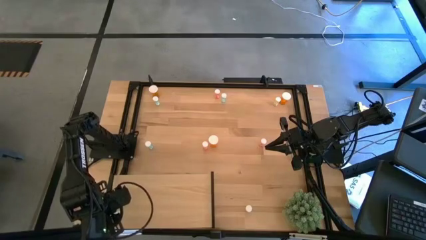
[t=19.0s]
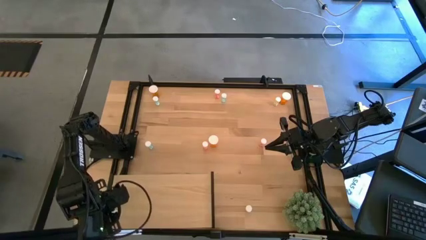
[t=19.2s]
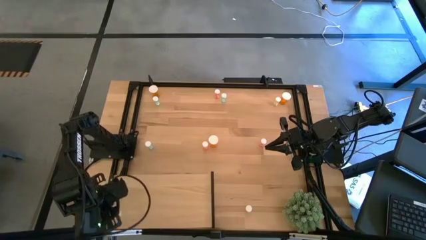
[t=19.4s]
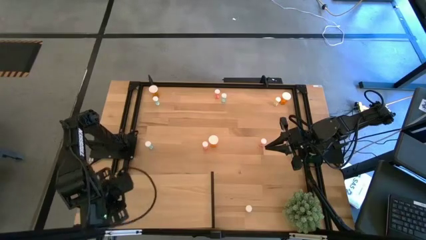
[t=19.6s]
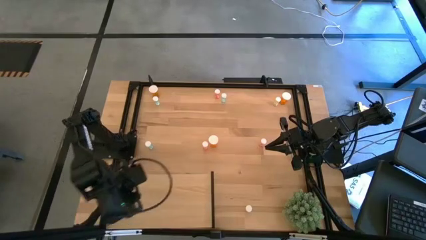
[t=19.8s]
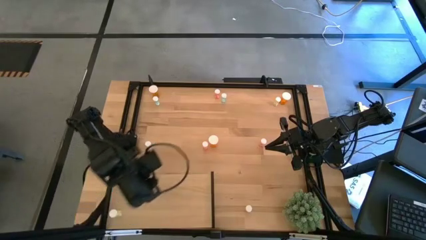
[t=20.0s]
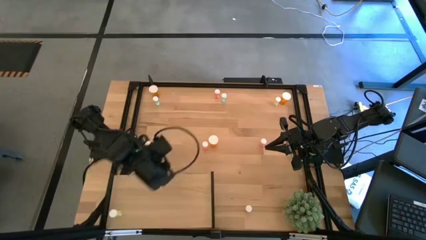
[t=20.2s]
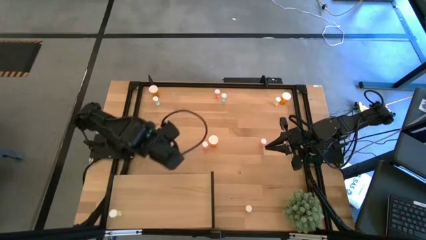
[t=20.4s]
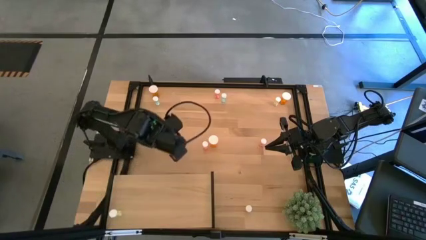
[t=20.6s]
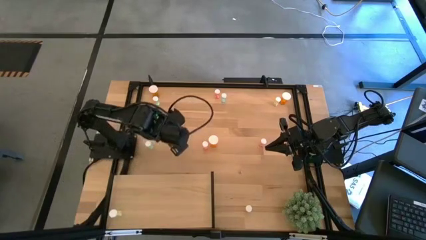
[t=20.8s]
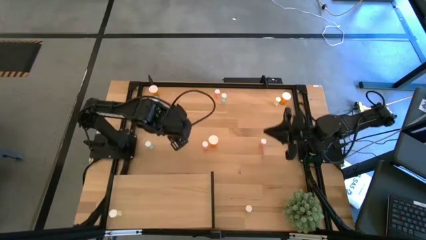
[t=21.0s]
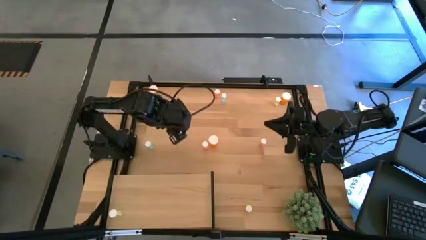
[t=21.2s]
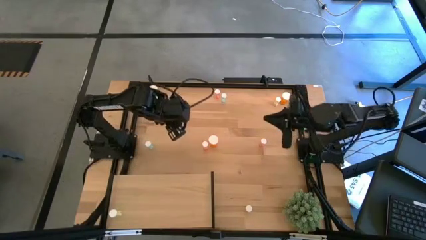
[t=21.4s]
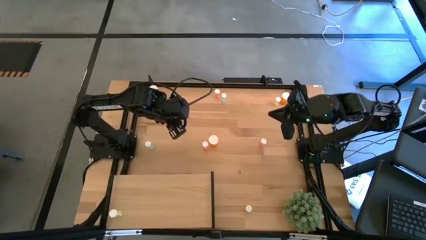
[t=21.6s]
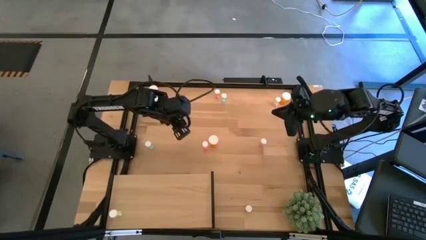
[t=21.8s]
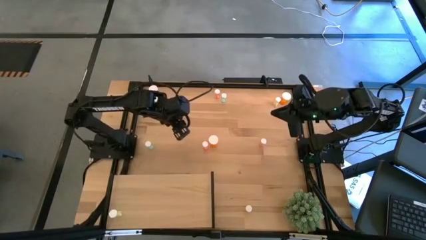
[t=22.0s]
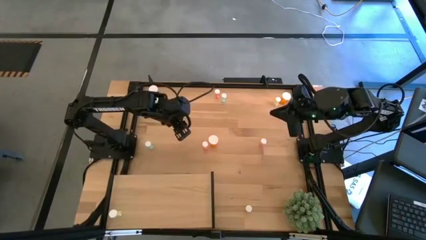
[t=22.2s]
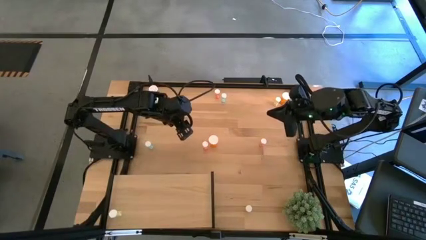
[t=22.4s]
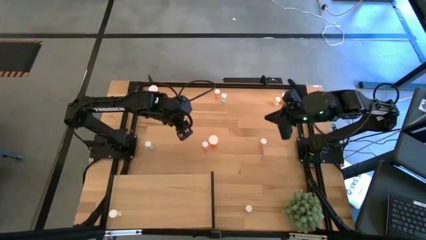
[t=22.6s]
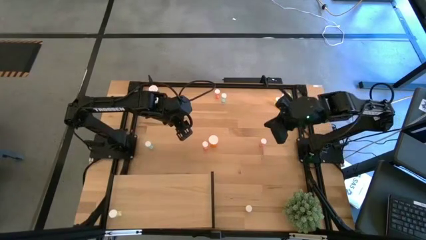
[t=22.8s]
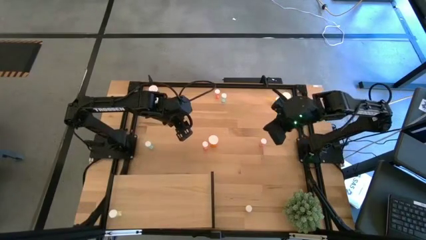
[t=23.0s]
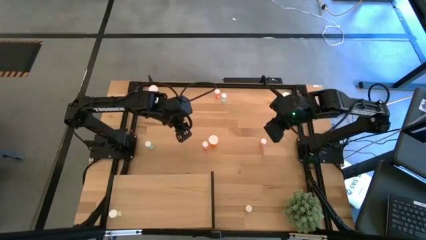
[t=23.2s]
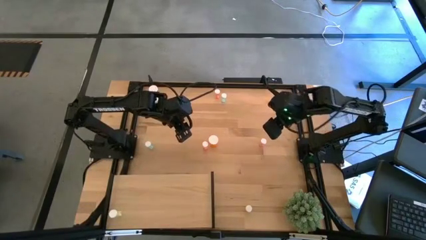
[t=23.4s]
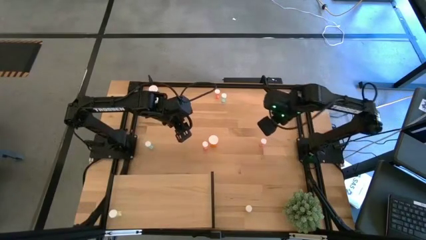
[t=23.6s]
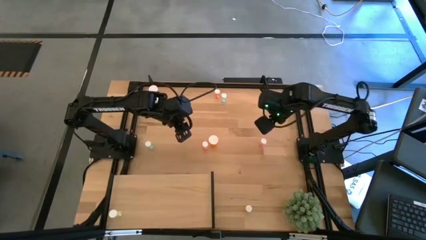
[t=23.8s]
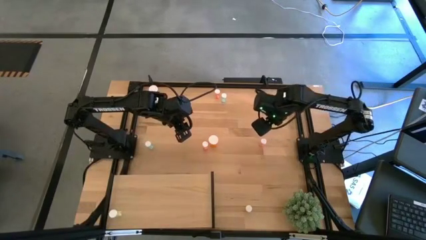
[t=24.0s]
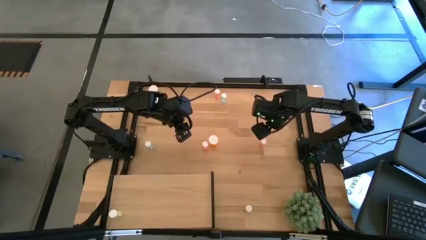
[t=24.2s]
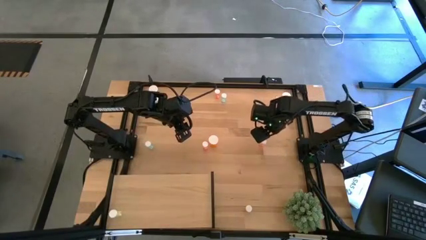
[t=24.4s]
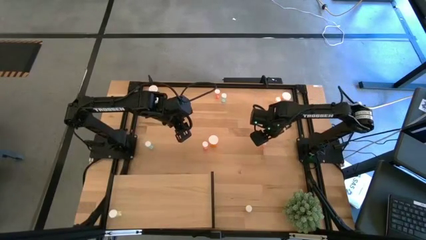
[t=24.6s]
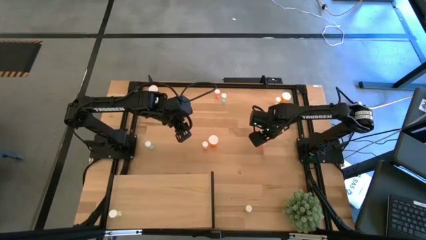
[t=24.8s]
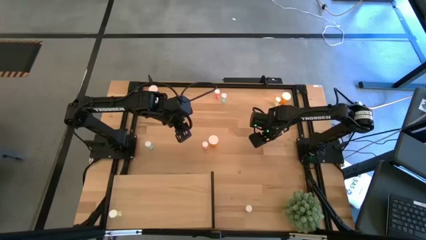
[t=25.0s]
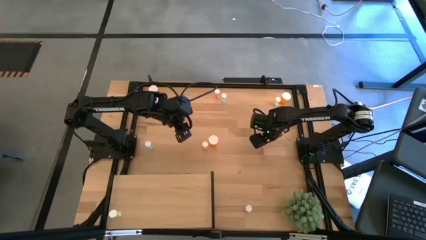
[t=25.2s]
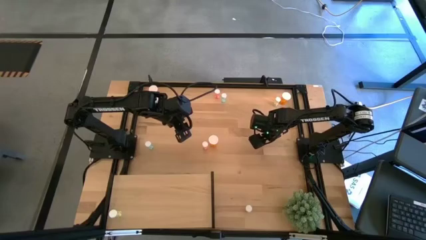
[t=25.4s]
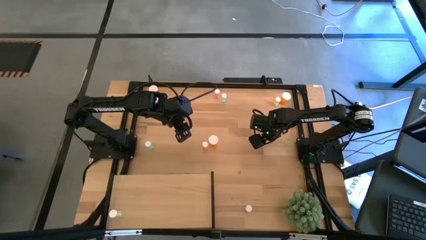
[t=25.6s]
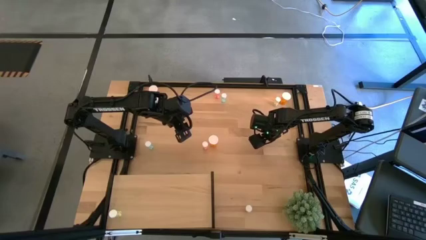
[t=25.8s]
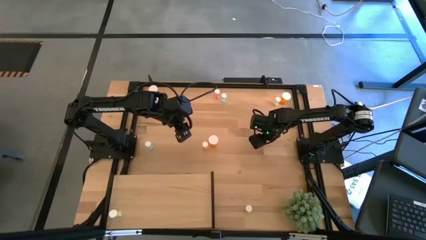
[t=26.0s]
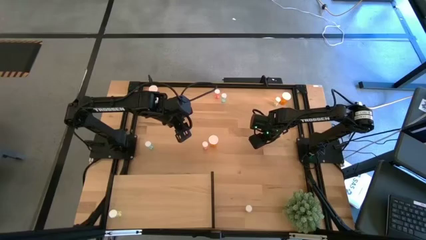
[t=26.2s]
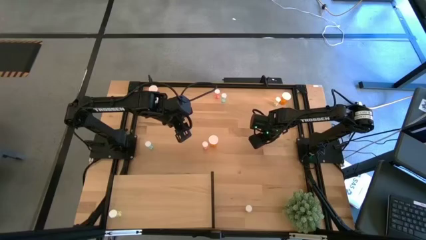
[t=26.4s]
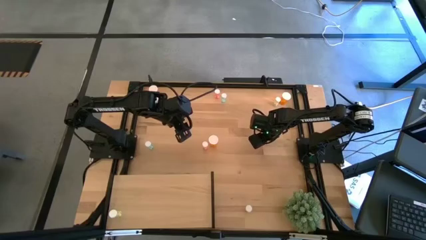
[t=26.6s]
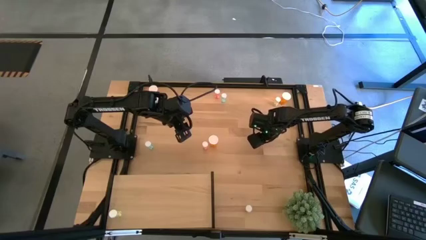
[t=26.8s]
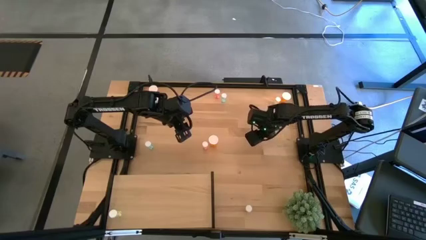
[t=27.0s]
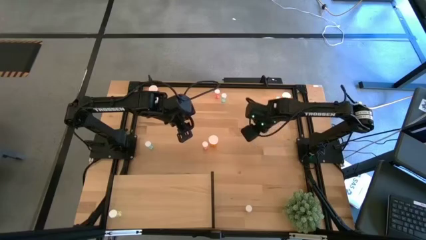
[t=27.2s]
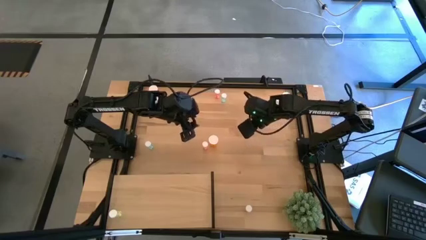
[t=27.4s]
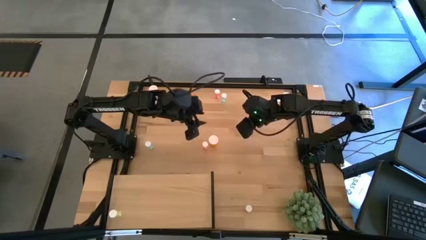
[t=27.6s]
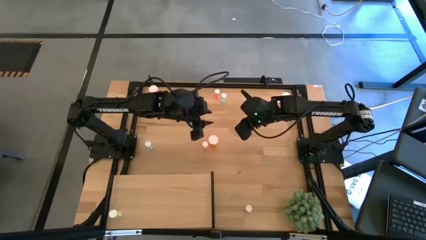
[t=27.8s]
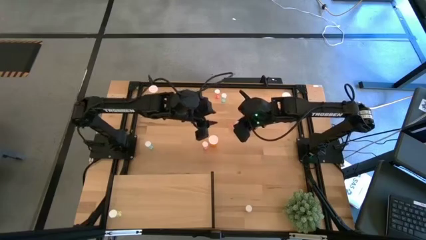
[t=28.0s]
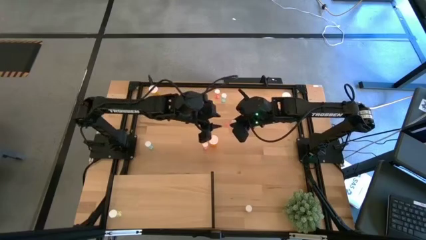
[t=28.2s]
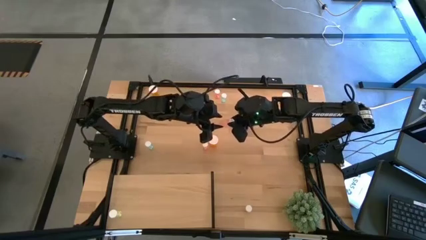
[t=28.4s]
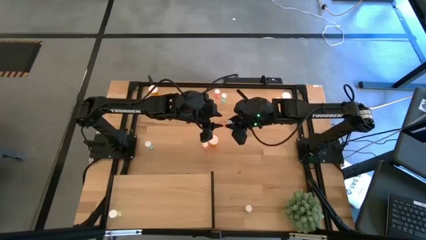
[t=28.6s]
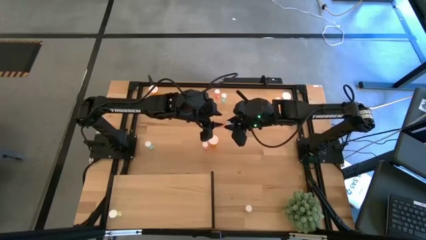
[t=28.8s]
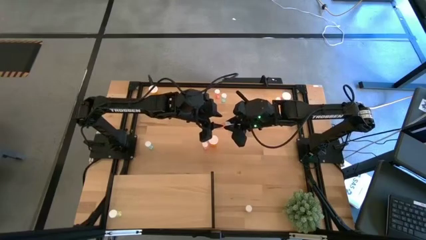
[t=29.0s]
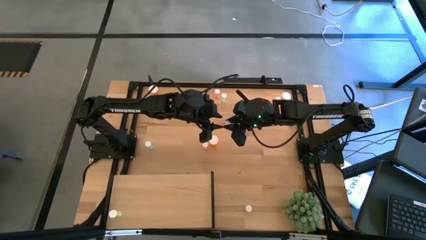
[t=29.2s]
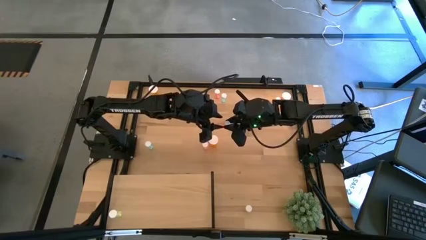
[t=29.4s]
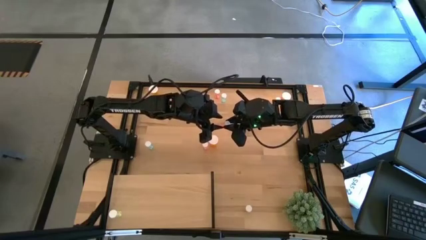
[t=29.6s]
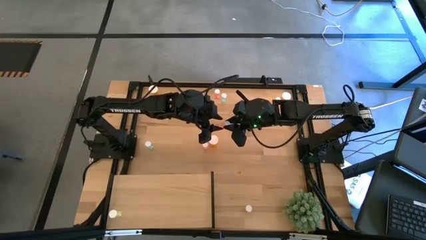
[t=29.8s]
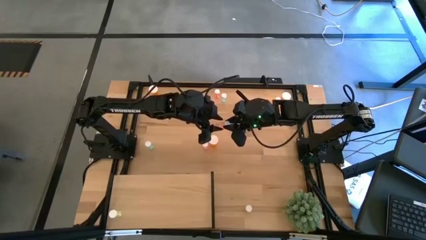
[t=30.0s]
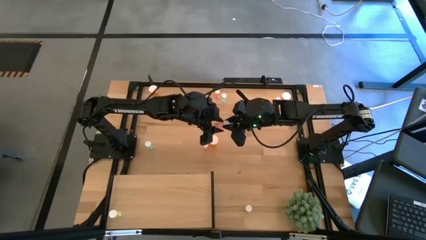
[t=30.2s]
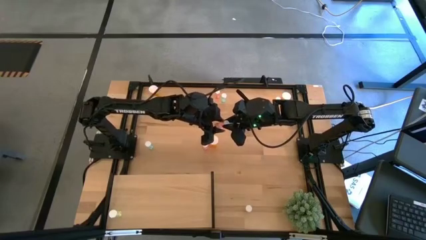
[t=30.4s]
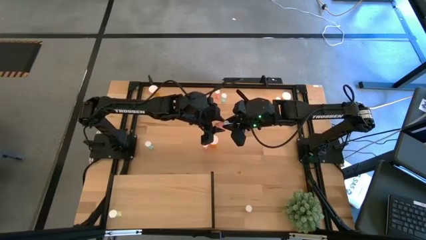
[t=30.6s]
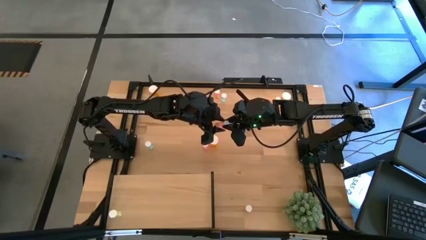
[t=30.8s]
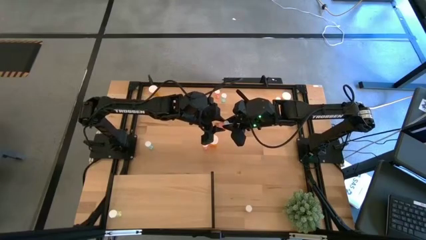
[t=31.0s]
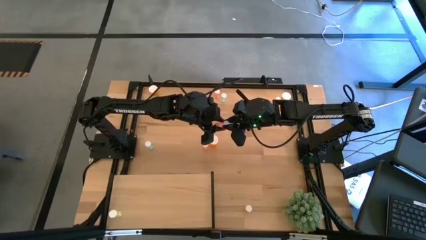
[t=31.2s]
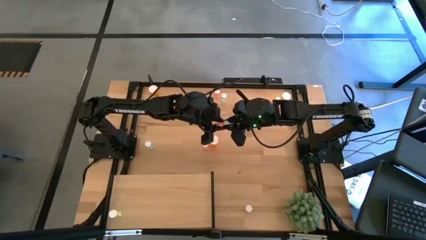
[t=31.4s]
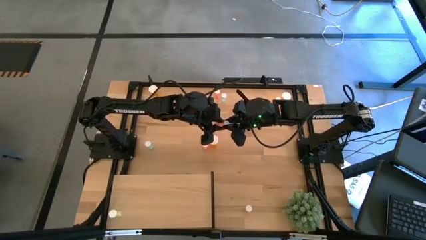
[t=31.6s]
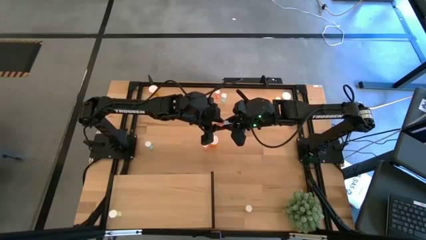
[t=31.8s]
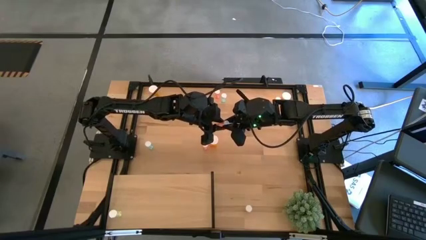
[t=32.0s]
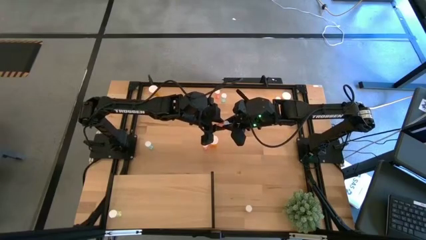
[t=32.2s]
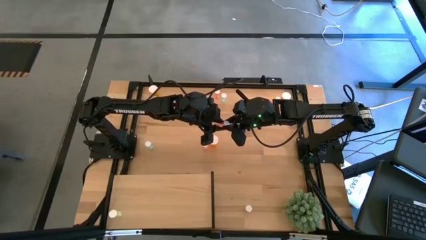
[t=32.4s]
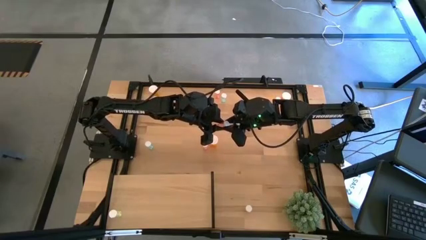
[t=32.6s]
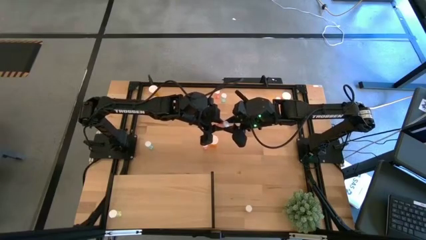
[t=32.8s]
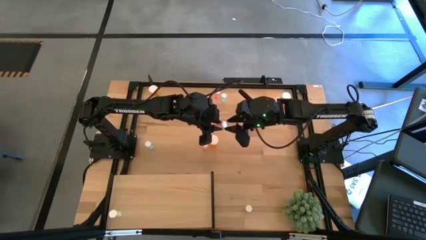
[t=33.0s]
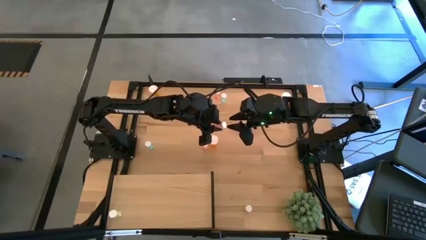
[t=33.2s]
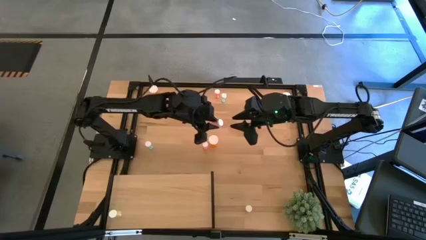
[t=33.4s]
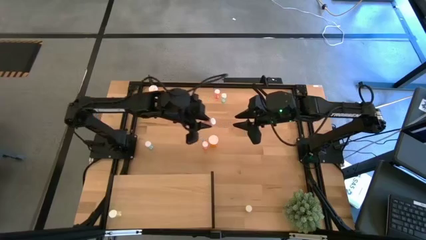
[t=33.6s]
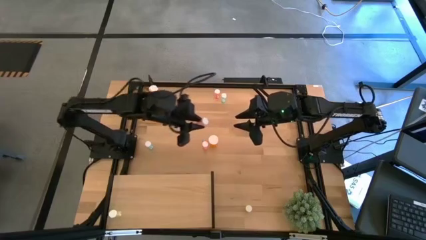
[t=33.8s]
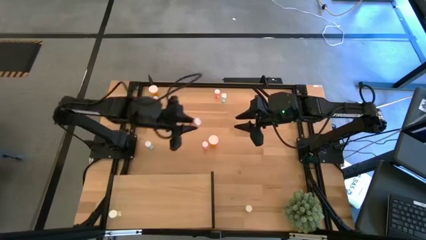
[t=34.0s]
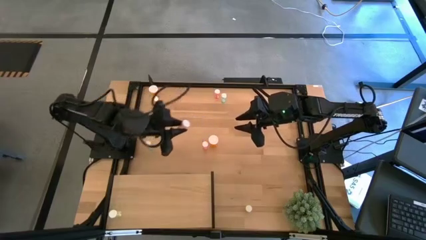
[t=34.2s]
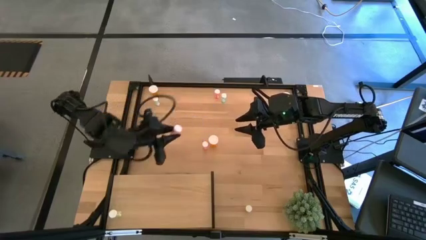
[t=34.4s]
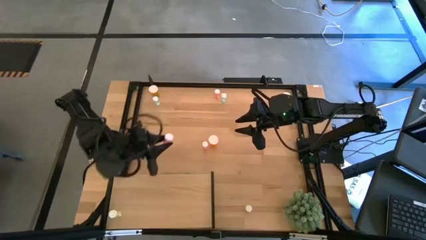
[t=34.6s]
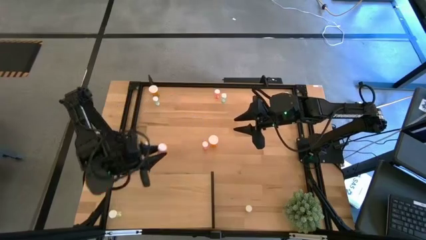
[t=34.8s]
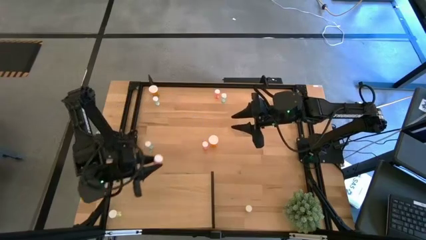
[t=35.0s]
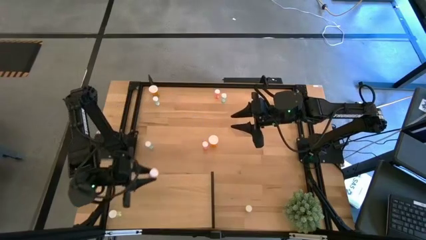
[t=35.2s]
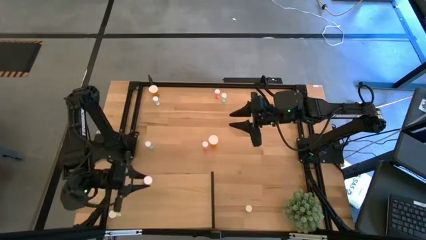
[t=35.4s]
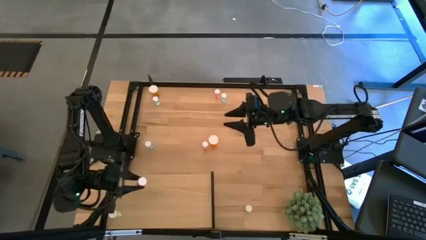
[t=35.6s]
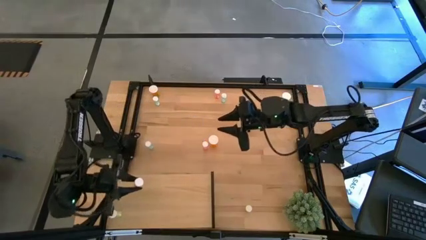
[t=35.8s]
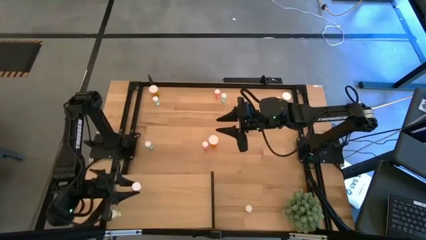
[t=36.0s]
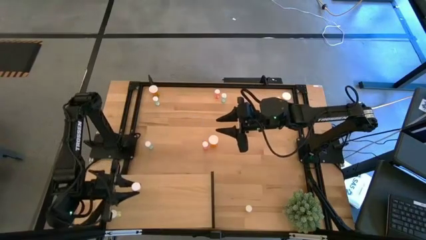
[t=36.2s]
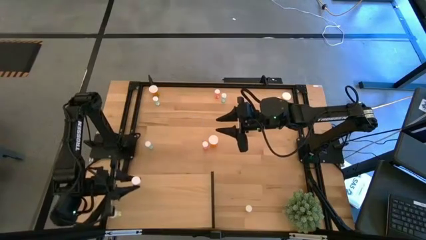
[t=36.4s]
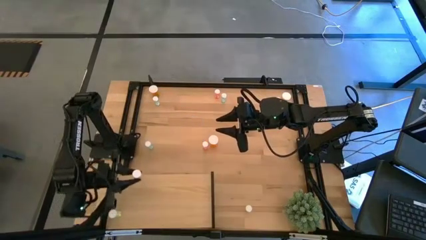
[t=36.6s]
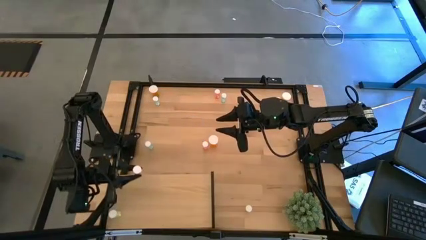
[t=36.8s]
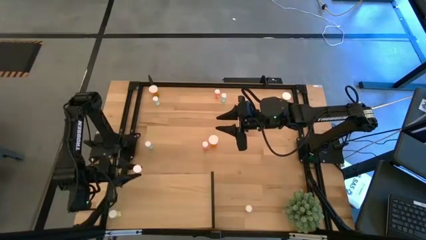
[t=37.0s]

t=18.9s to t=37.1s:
Task: Pick and place medicine bottles onto shelf by color
Put the right pink pill bottle on the shelf
